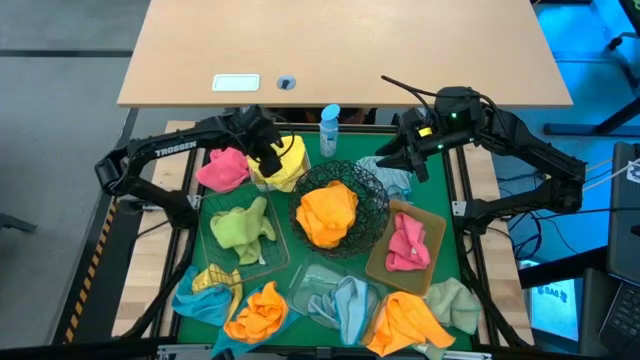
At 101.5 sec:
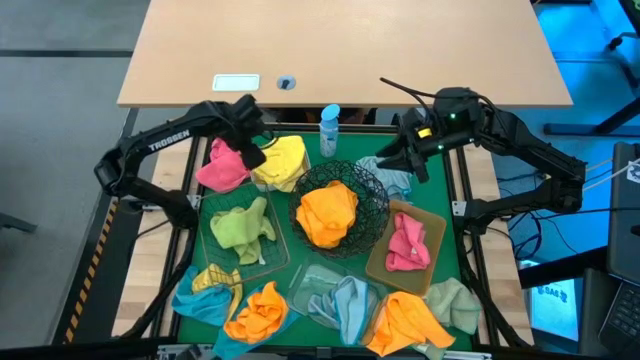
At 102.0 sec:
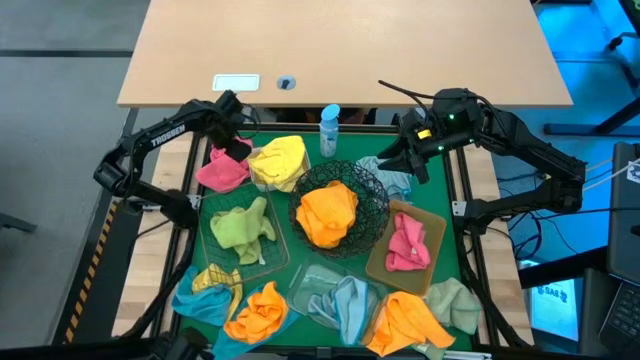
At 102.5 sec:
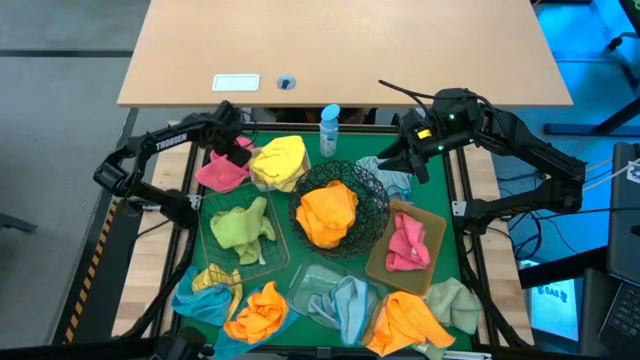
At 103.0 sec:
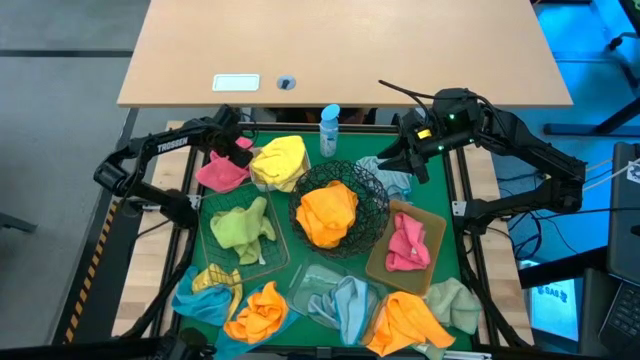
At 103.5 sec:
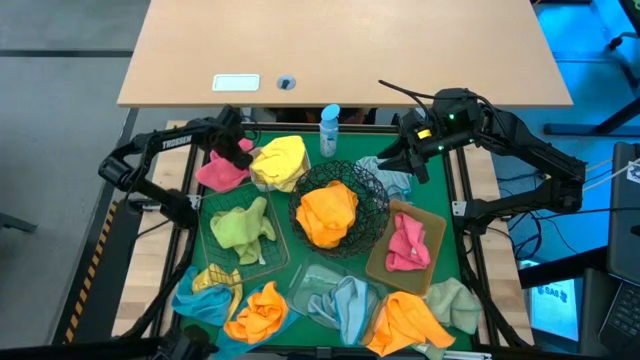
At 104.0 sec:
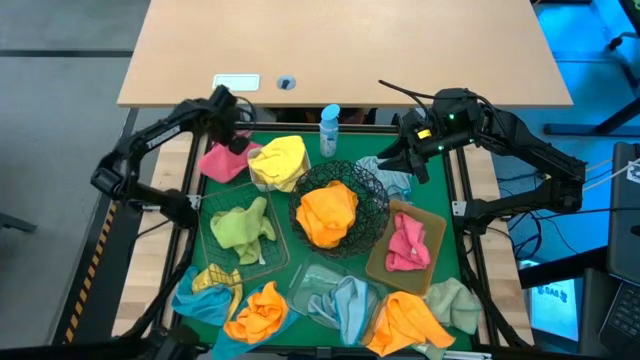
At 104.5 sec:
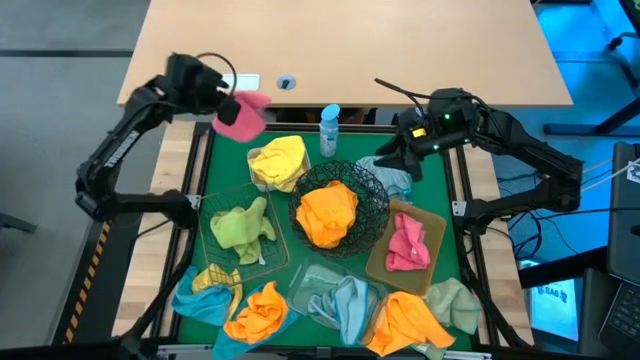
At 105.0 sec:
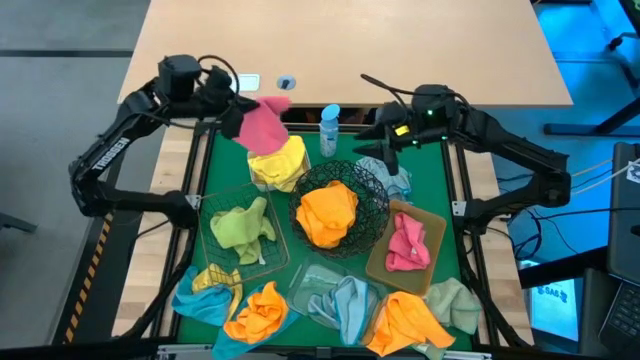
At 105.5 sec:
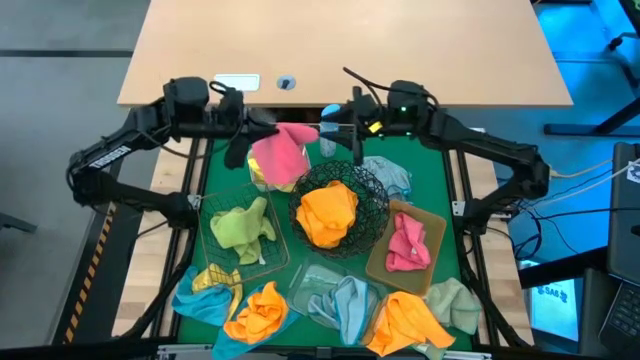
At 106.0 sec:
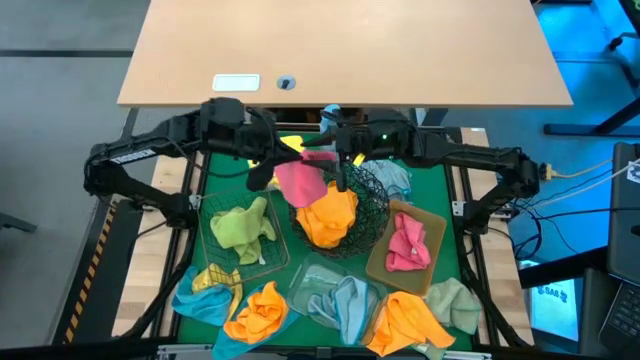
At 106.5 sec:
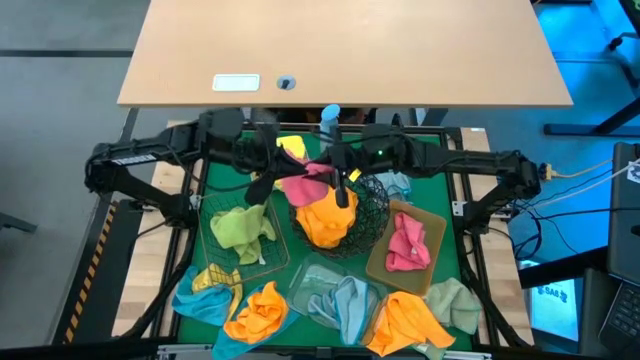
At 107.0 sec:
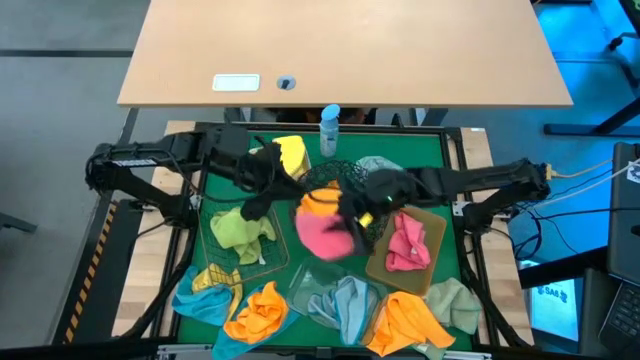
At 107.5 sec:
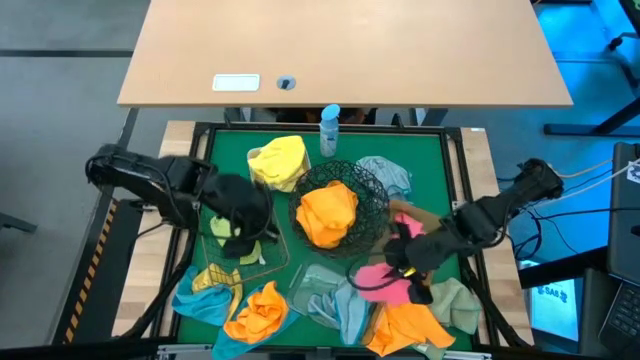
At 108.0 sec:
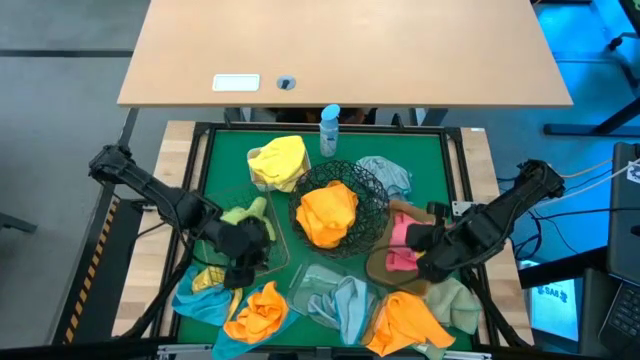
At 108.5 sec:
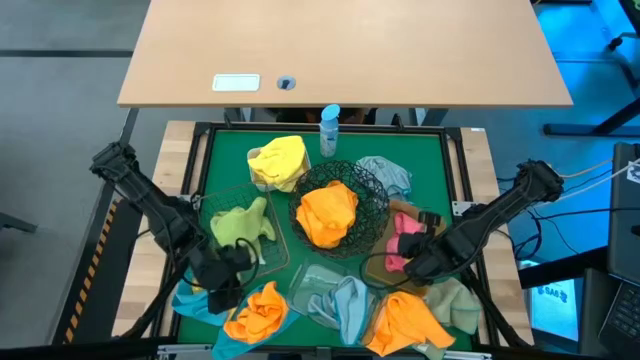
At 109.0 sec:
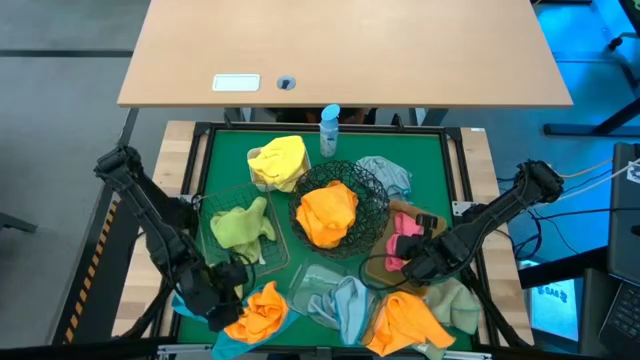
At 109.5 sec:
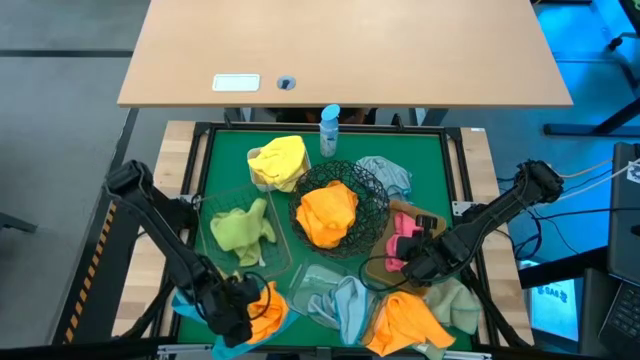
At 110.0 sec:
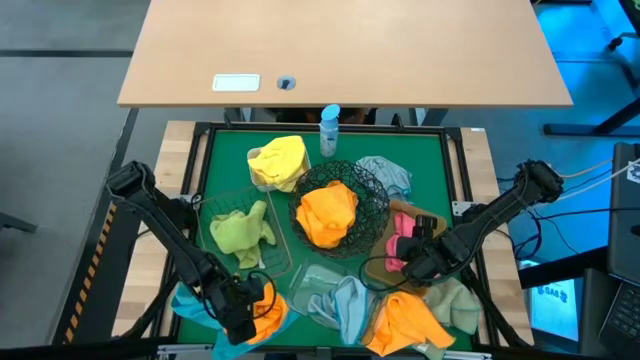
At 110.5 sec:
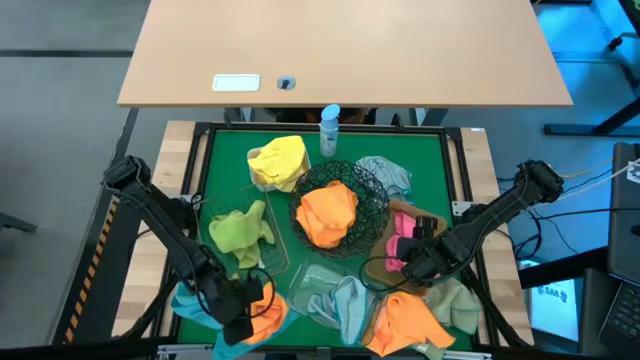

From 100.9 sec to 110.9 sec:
Task: Sort microfiber towel by color & place in baskets
Put the pink towel into the orange bin

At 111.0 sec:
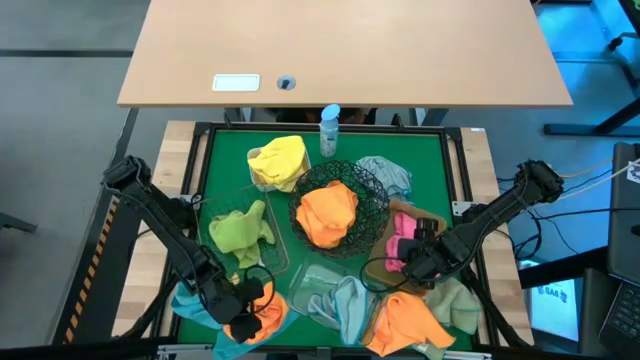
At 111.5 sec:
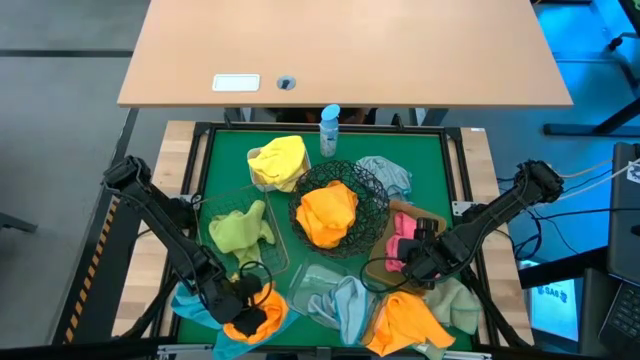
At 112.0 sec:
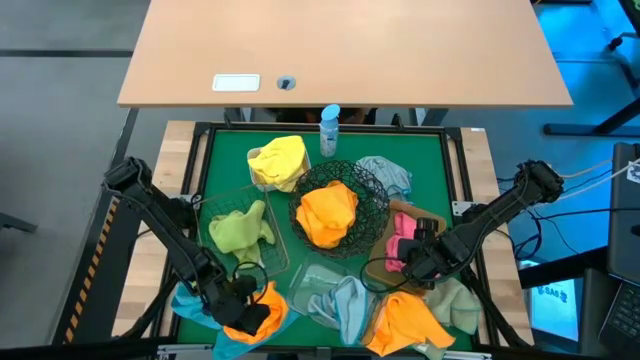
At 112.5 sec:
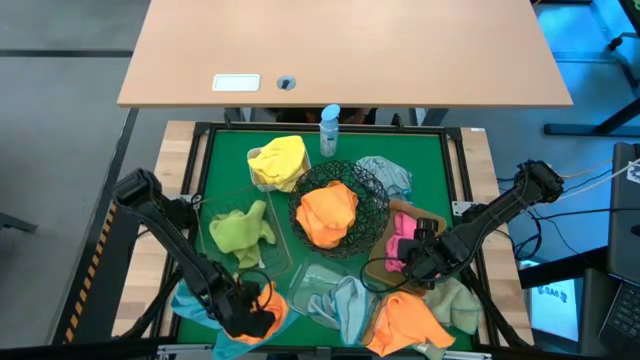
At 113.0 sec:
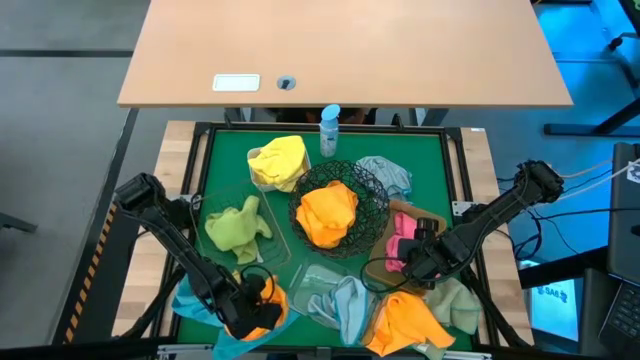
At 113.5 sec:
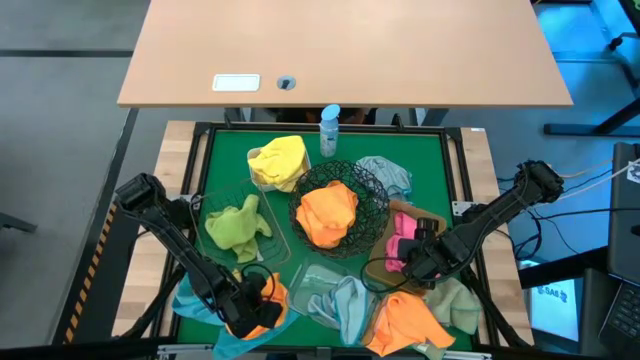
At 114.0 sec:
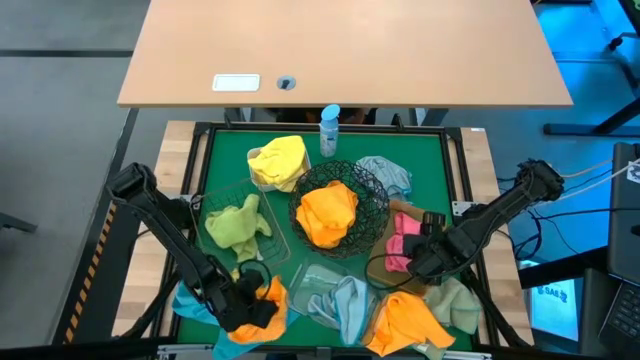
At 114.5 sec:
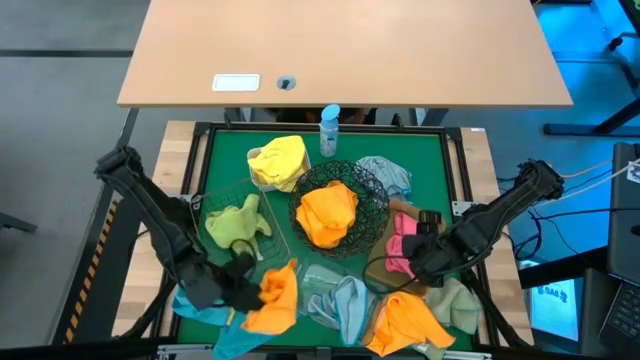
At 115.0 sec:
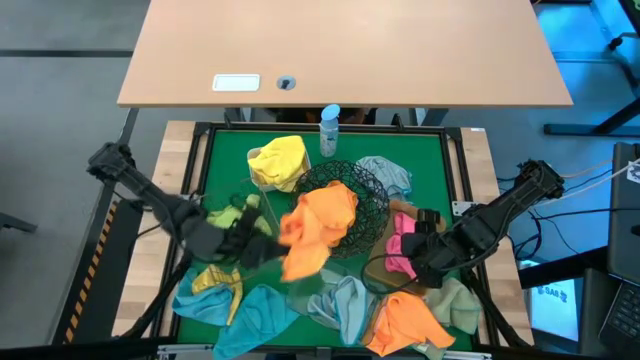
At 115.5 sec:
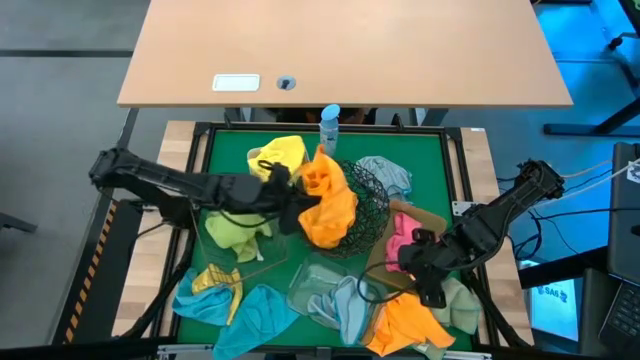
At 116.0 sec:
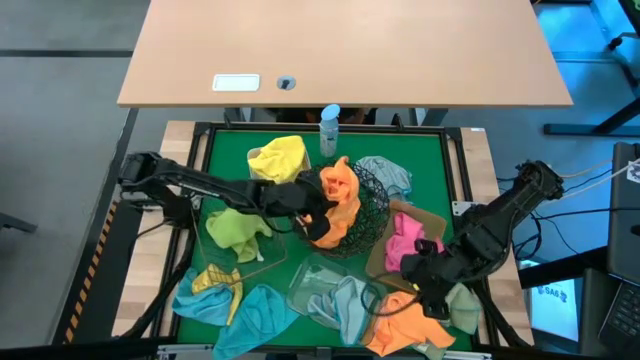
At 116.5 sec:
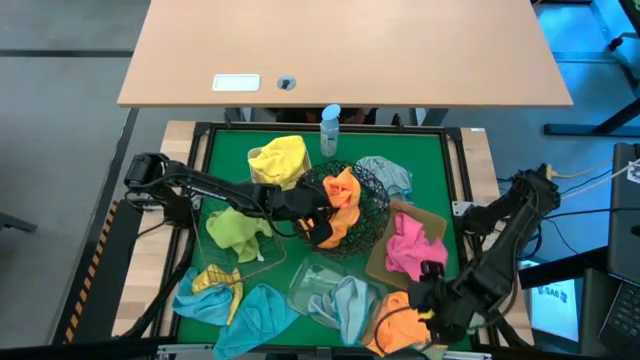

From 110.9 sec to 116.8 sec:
Put the orange towel into the round wire basket

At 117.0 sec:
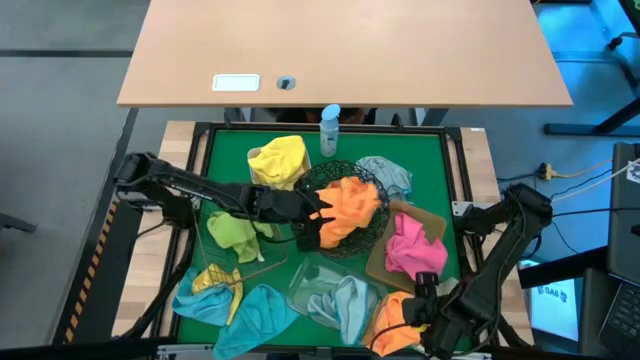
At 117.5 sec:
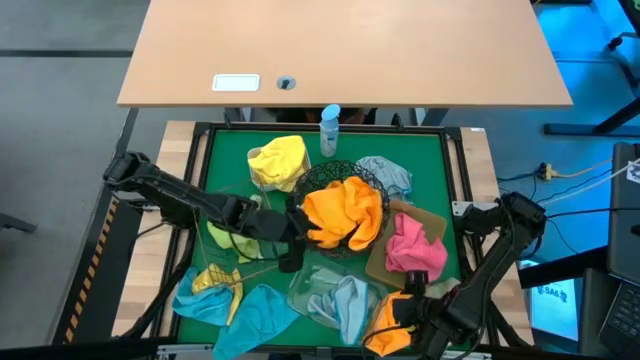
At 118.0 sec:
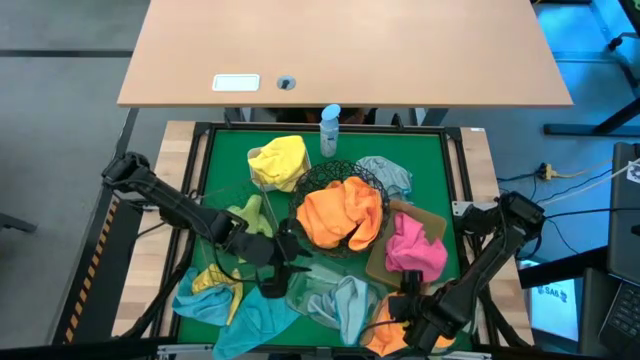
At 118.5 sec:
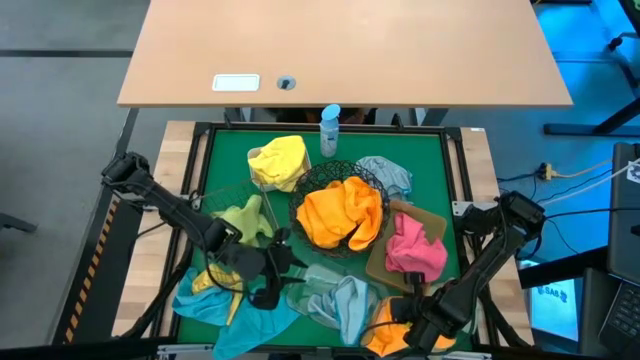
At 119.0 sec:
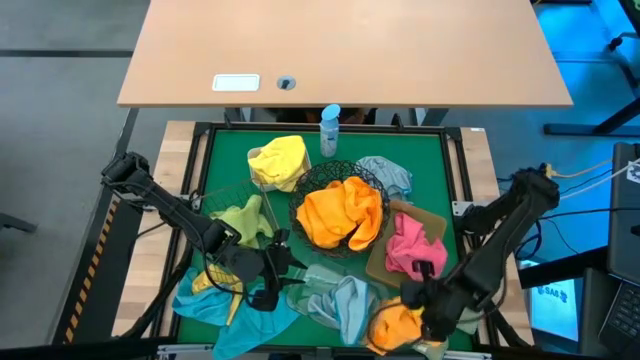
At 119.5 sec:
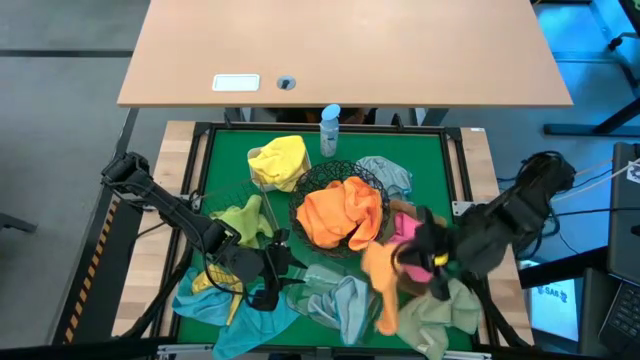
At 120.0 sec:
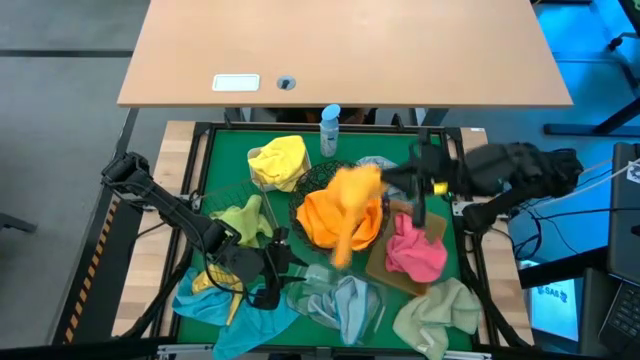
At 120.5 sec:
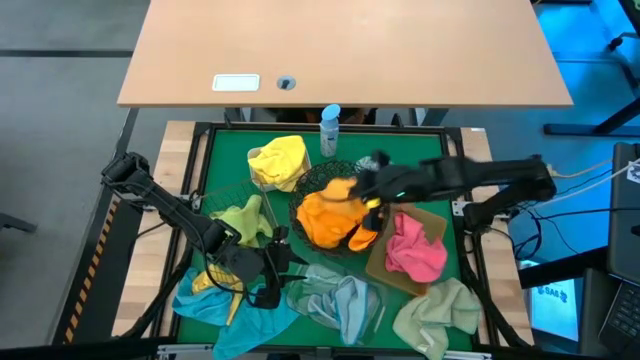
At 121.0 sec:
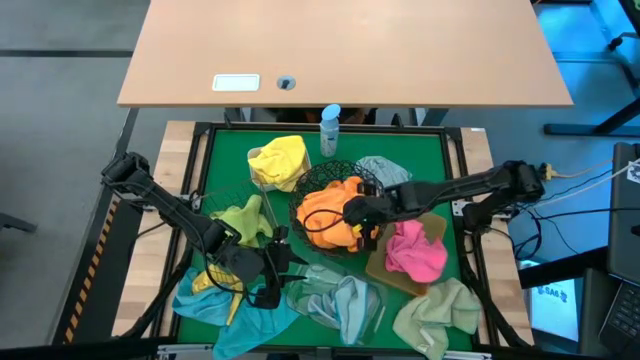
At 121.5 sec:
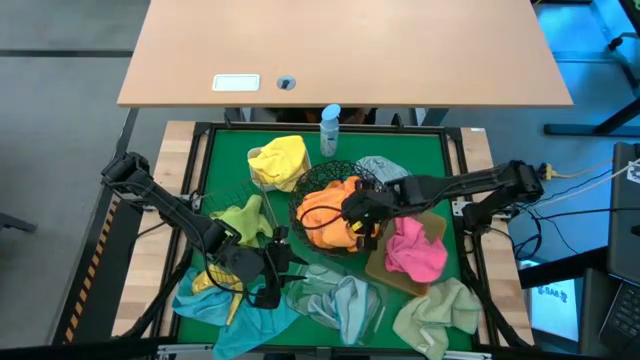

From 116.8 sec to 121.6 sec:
Put the orange towel into the round wire basket
